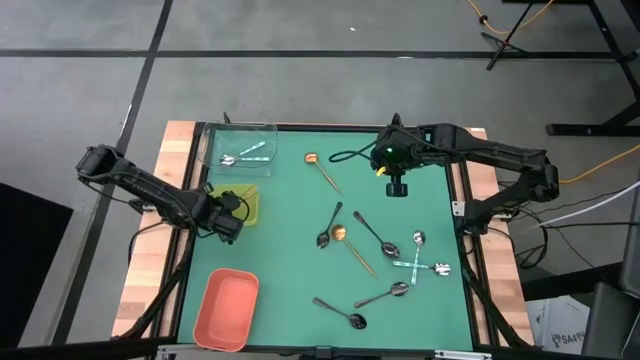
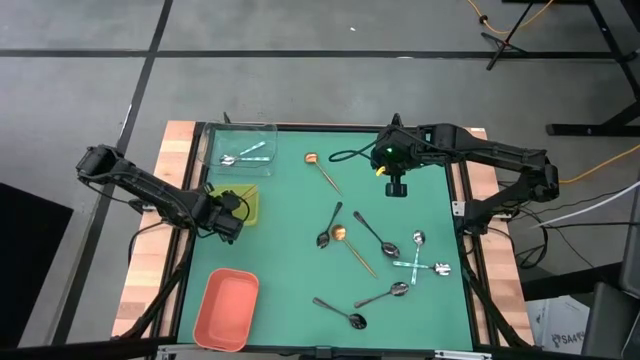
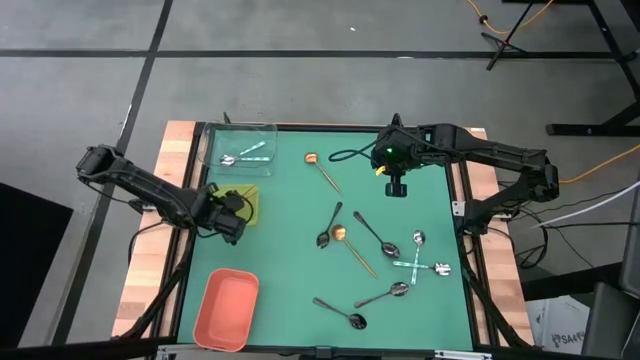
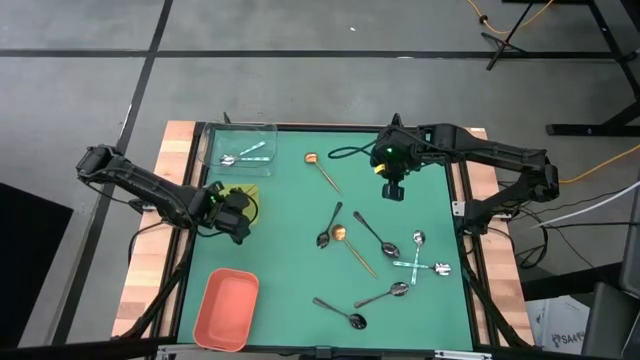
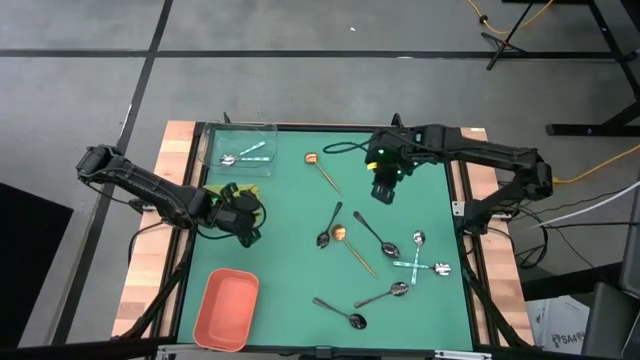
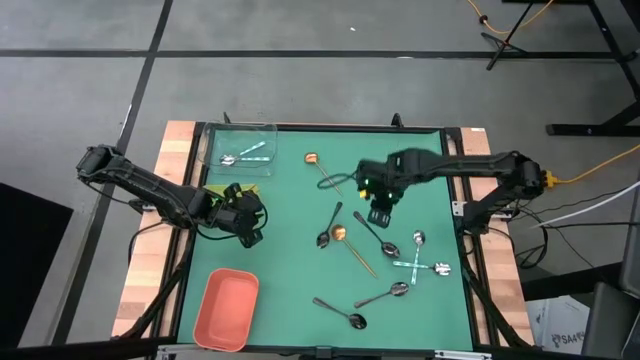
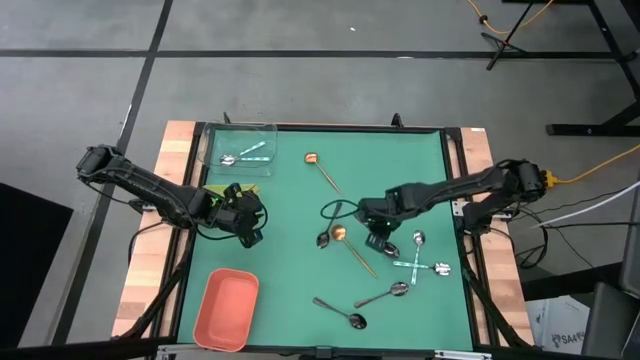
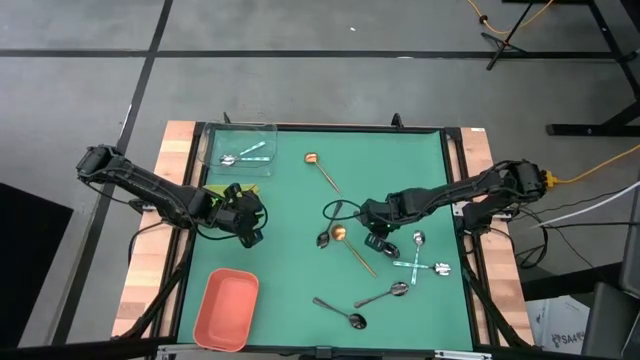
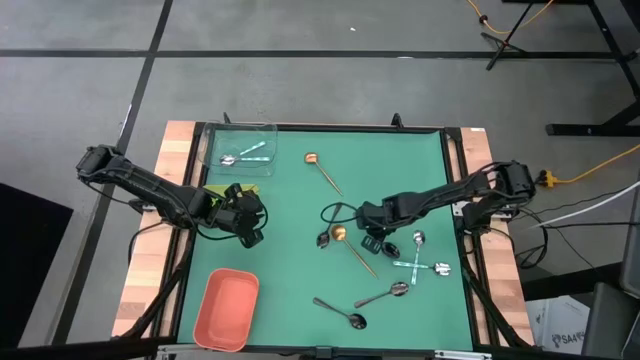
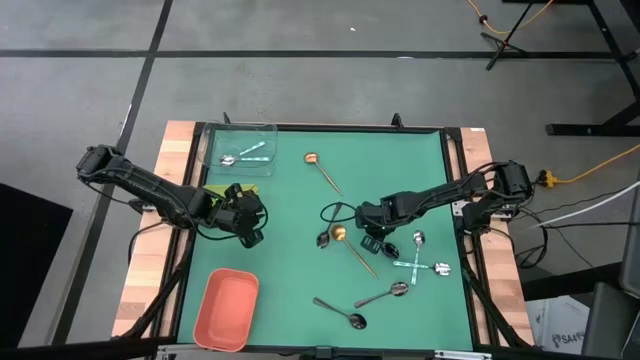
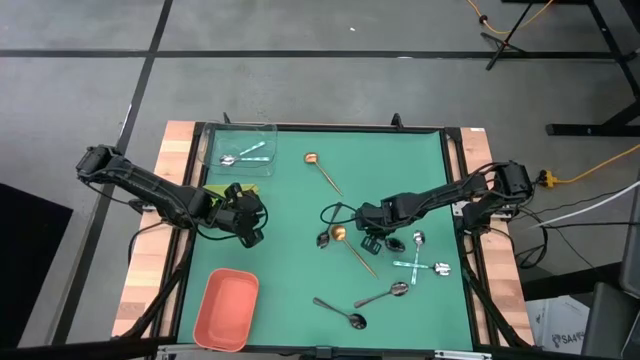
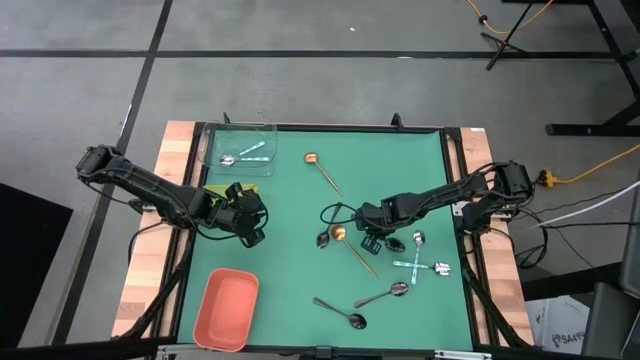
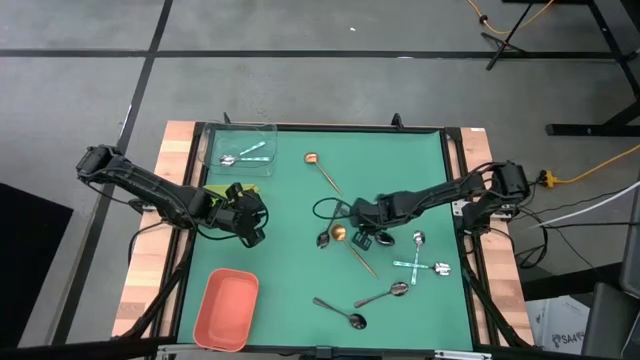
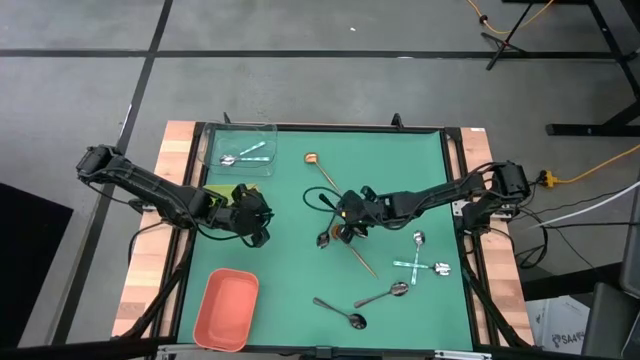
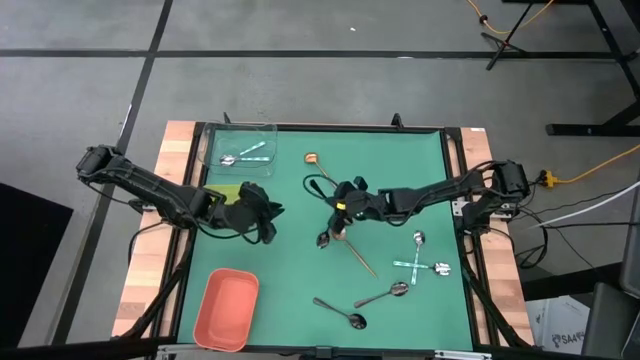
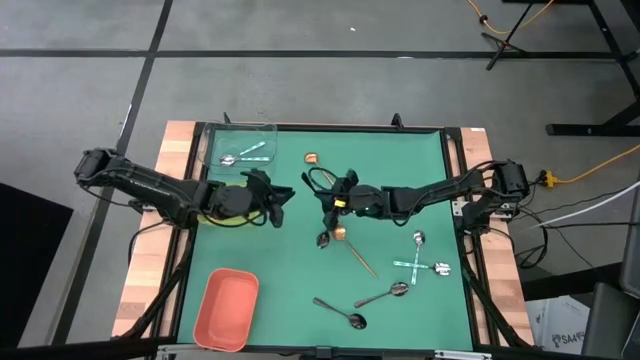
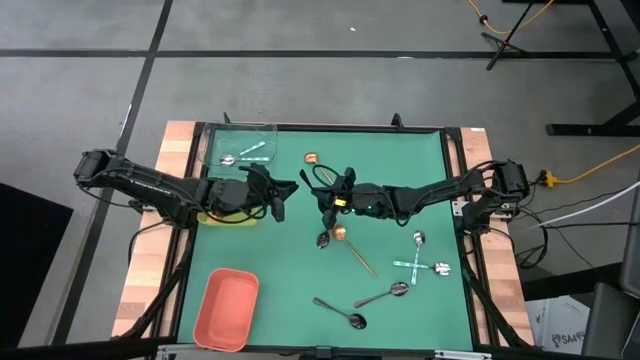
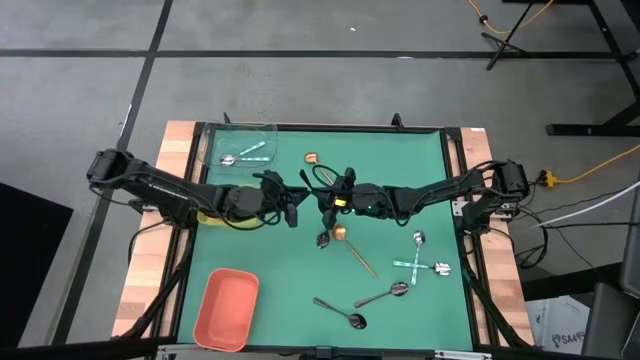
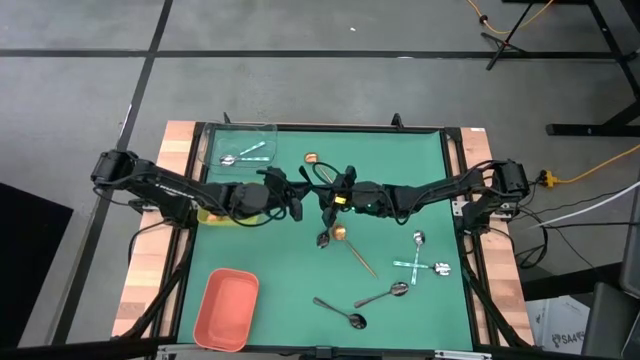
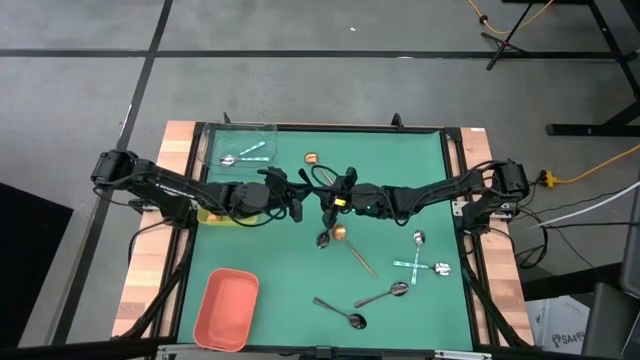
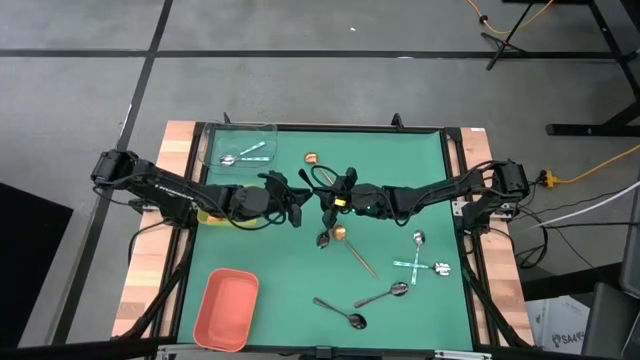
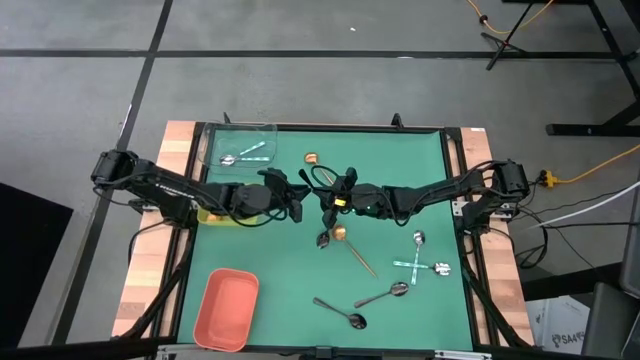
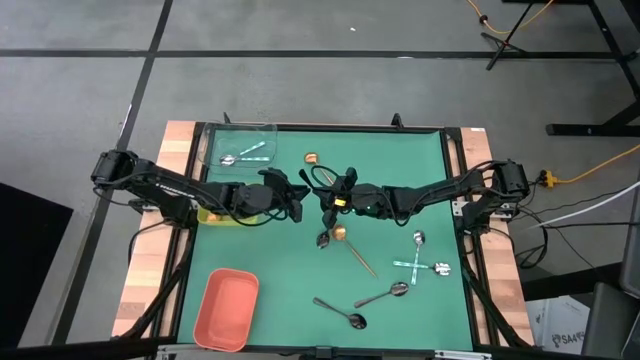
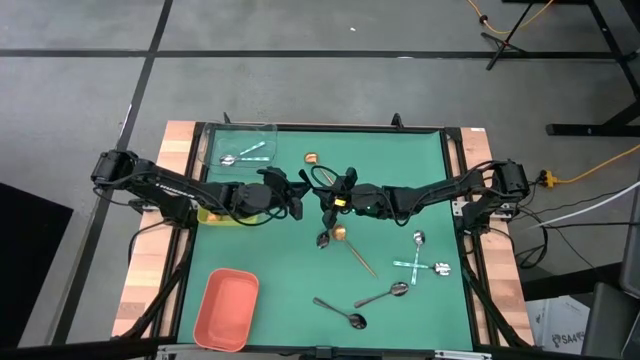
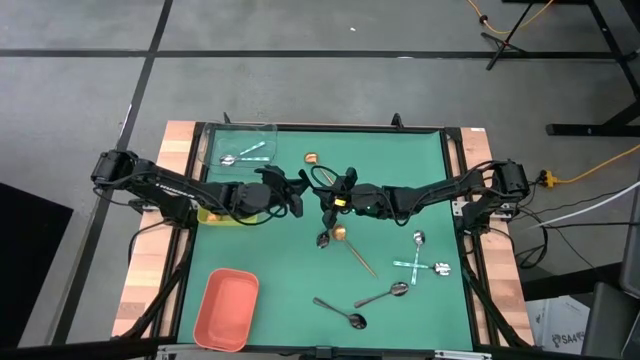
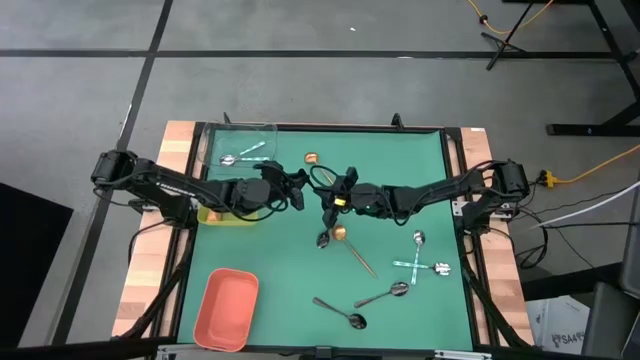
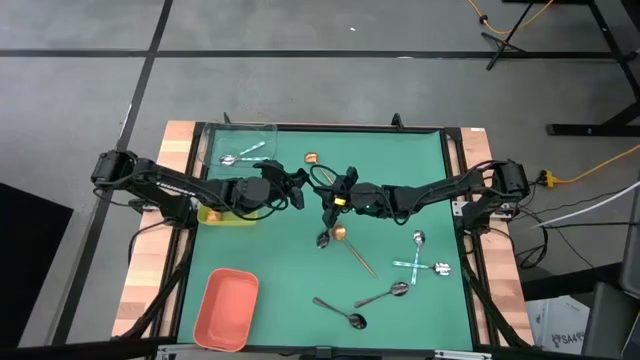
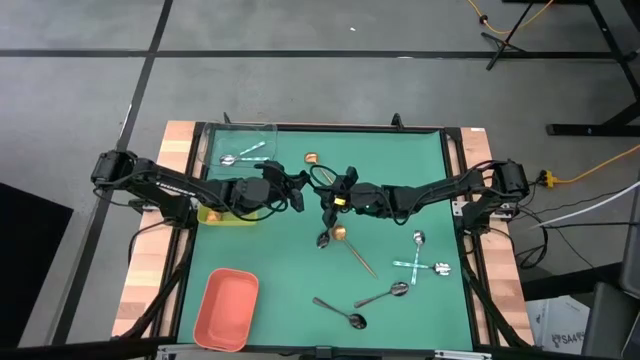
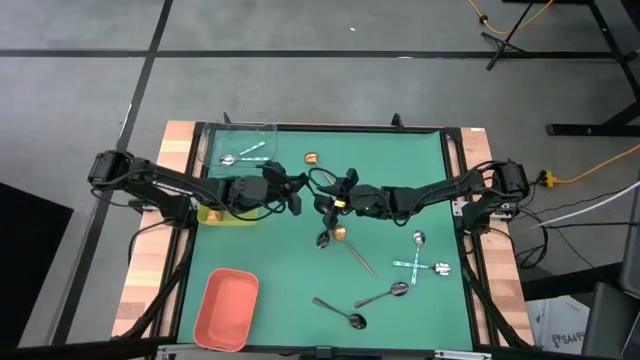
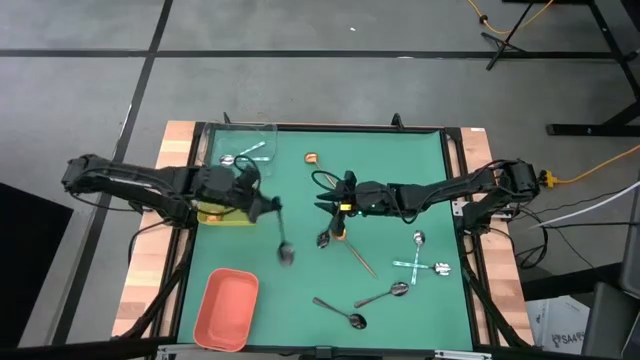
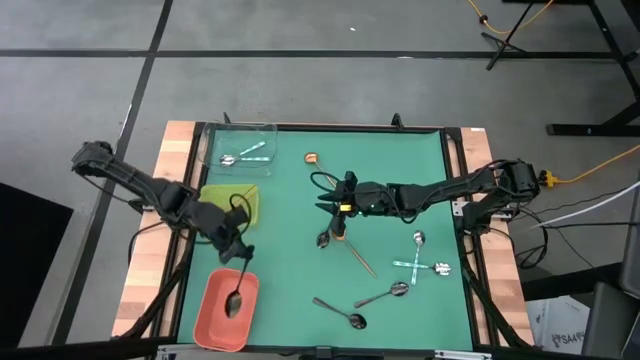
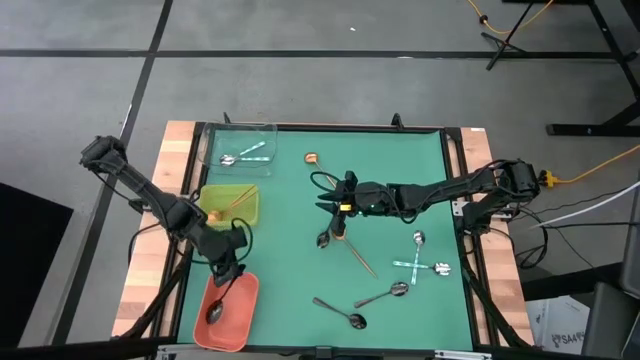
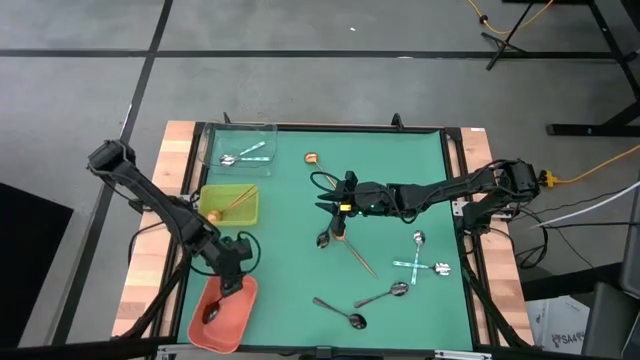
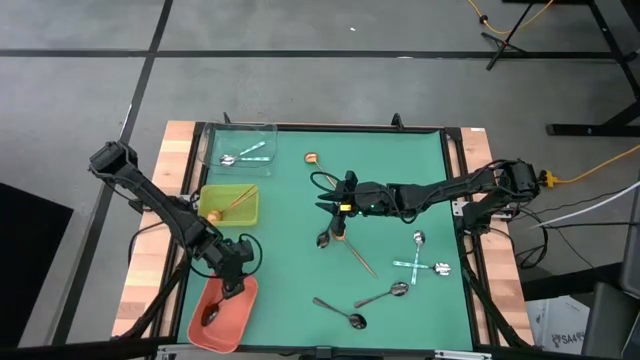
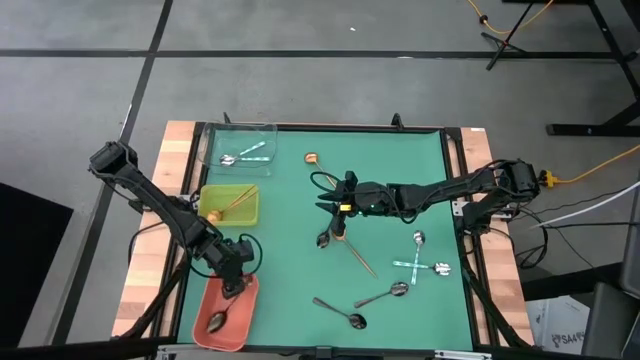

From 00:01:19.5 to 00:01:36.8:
Task: Sort silverware by color (type)
Put the black spoon into the orange bin
